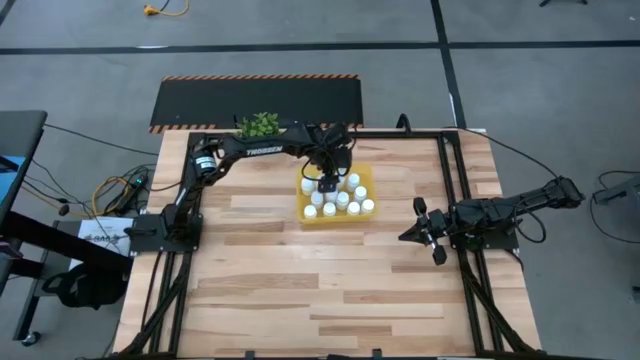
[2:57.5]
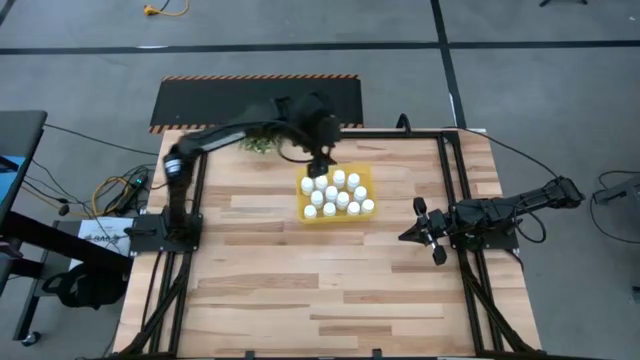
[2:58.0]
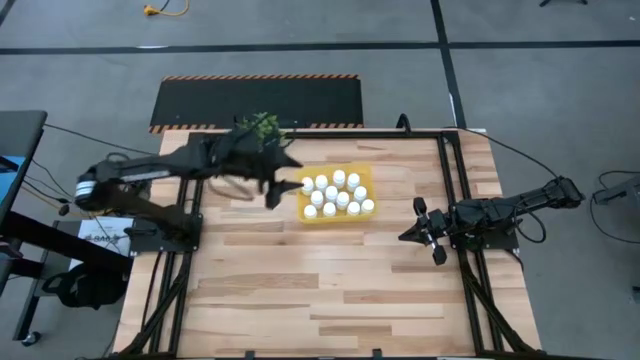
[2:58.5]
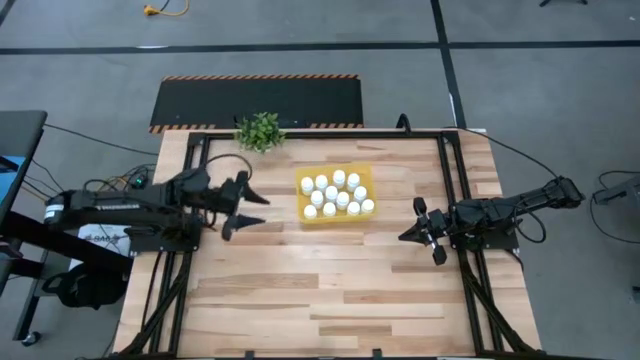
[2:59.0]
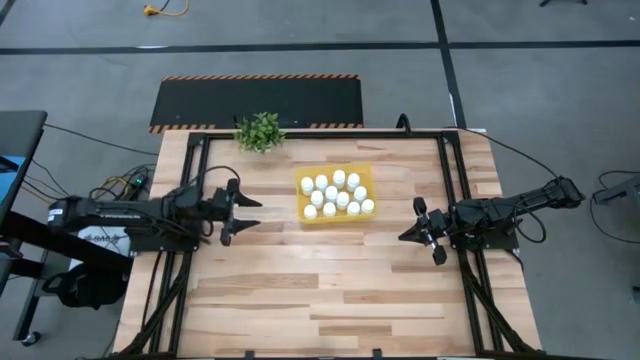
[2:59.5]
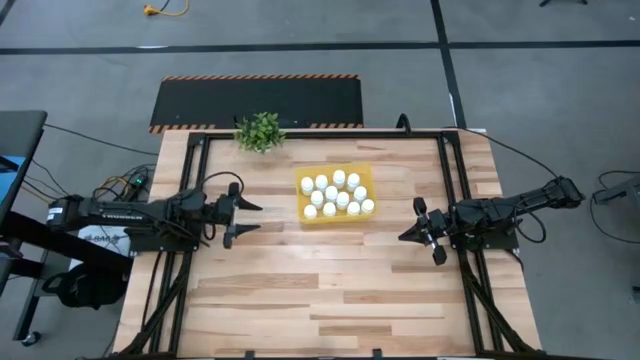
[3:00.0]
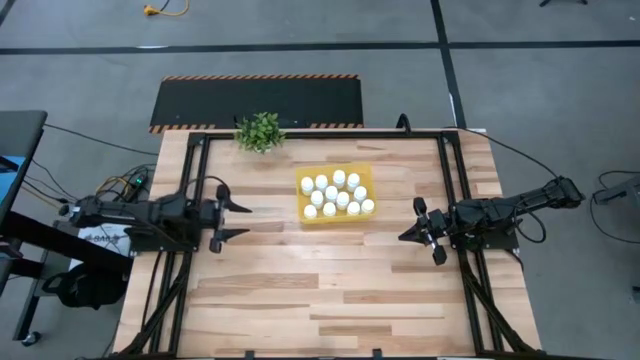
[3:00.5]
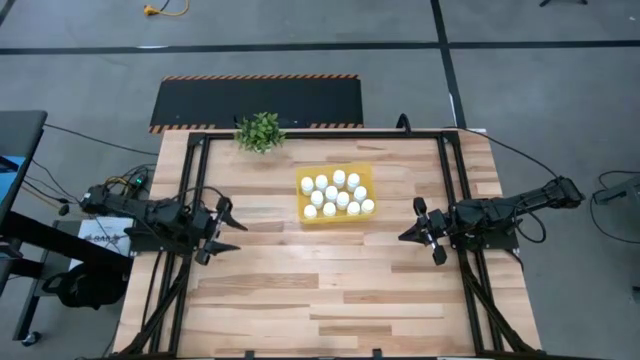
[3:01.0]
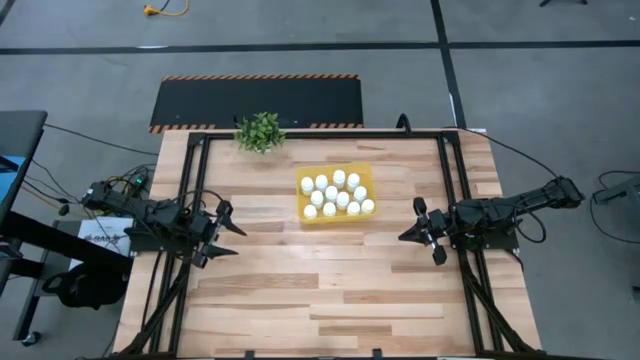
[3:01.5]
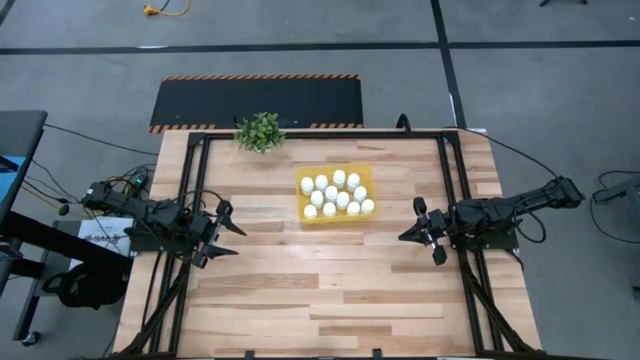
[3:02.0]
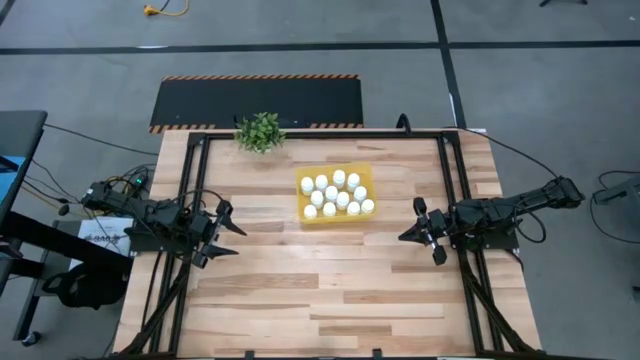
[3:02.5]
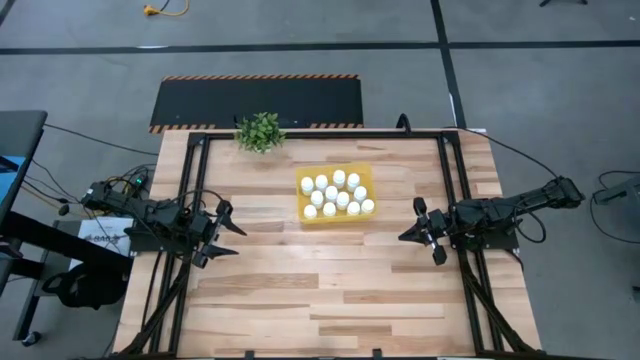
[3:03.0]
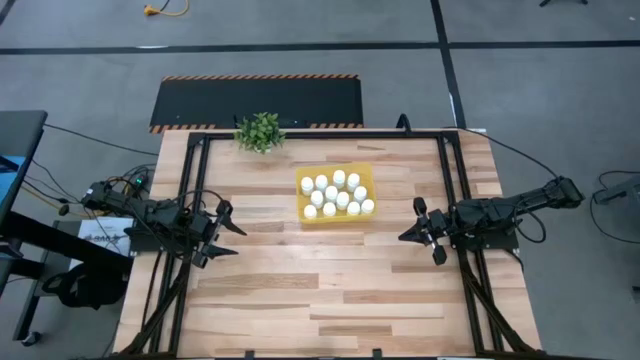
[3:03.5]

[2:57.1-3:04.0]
Task: Pick and place pill bottles into a basket
Return to Home Position

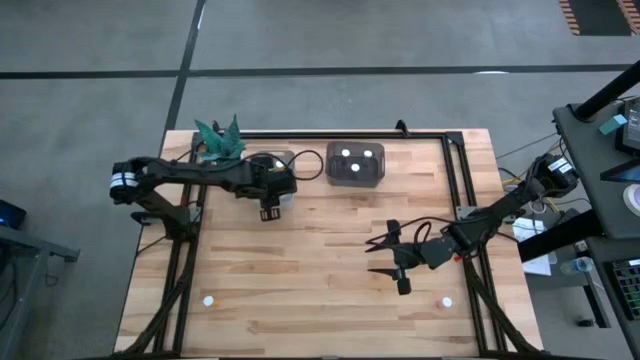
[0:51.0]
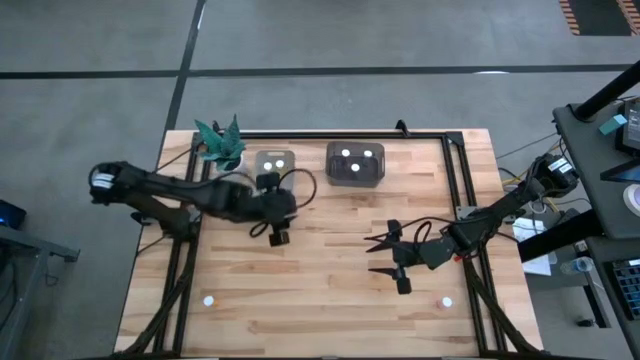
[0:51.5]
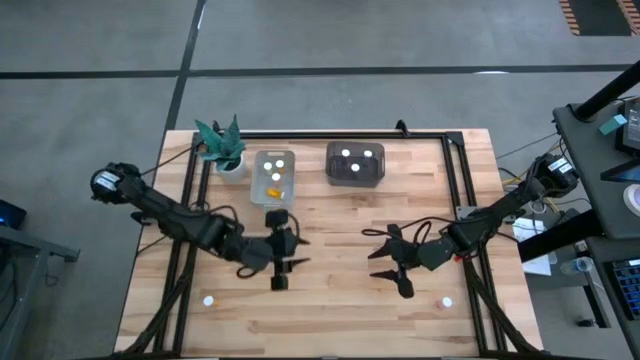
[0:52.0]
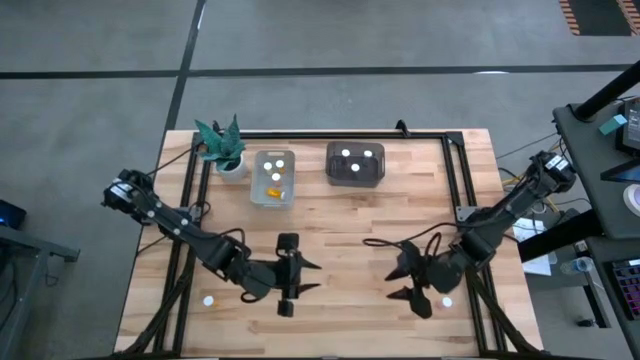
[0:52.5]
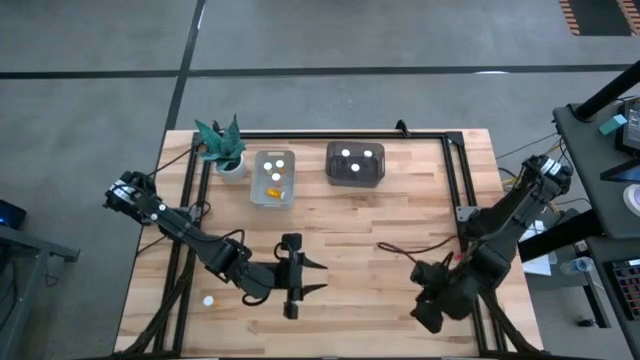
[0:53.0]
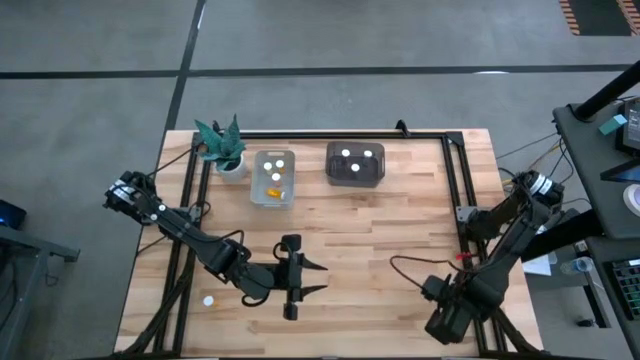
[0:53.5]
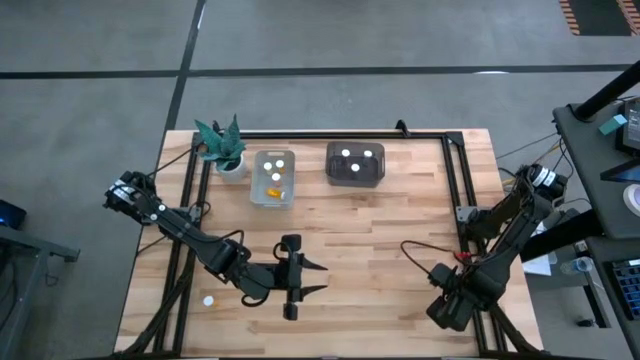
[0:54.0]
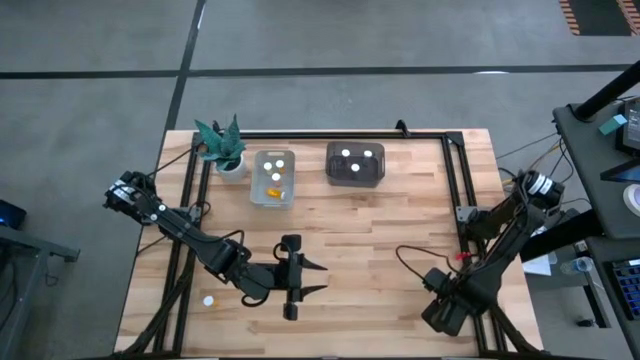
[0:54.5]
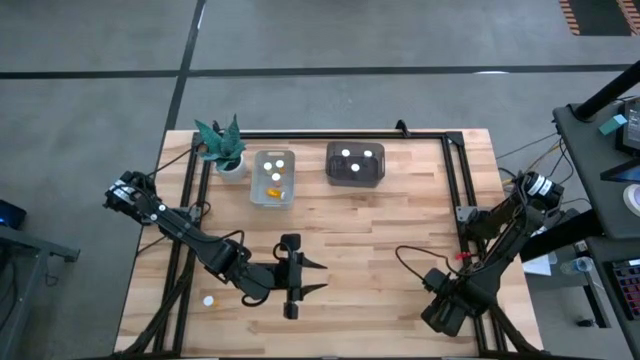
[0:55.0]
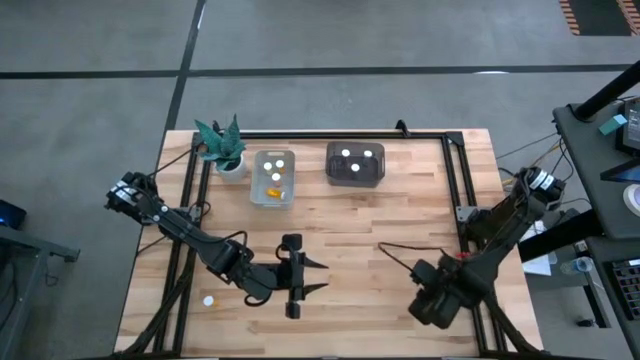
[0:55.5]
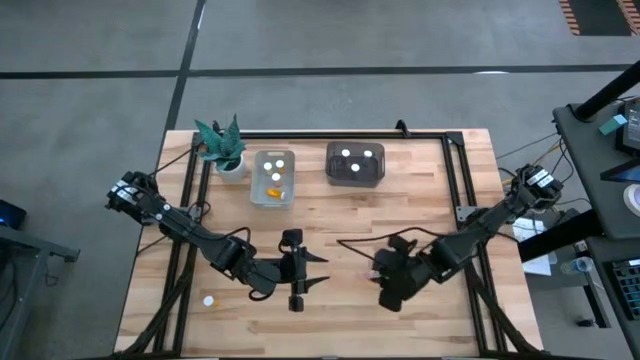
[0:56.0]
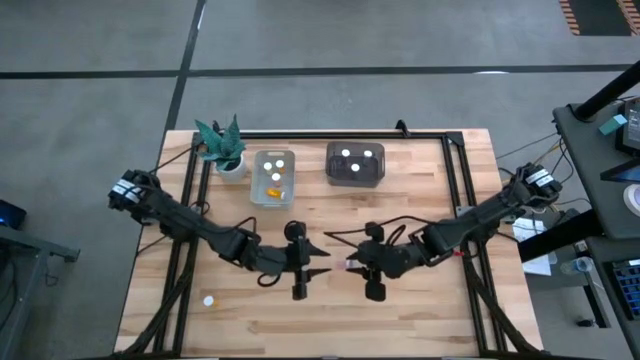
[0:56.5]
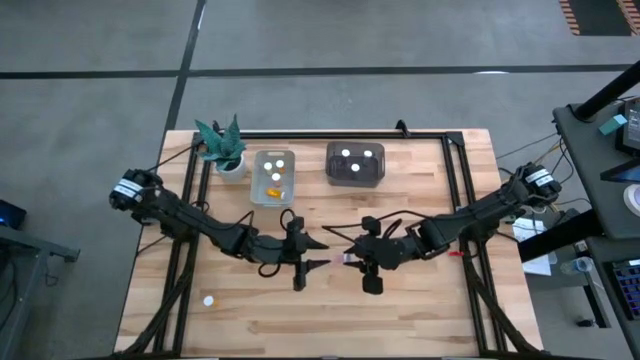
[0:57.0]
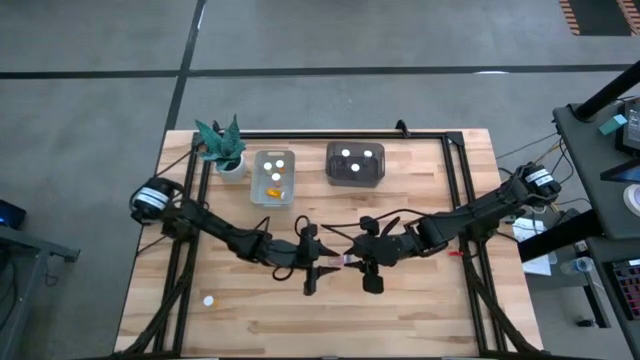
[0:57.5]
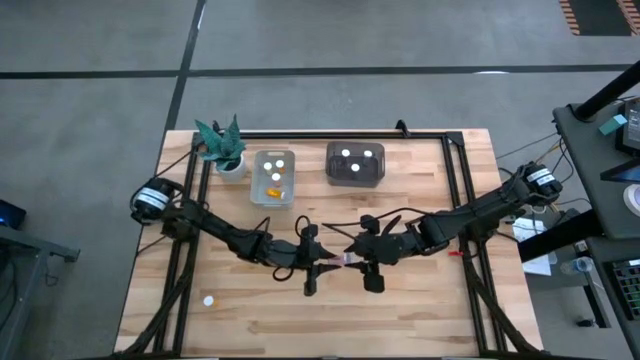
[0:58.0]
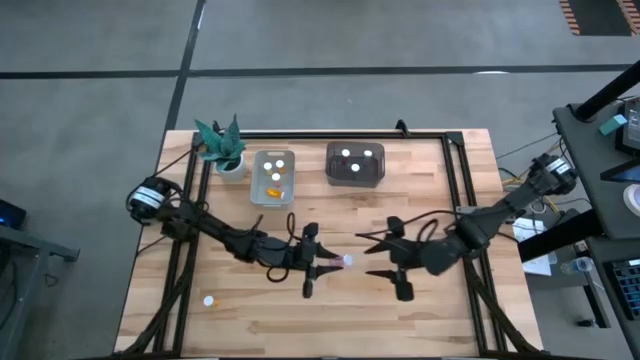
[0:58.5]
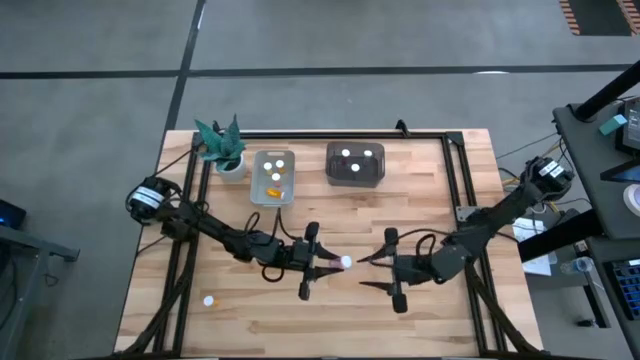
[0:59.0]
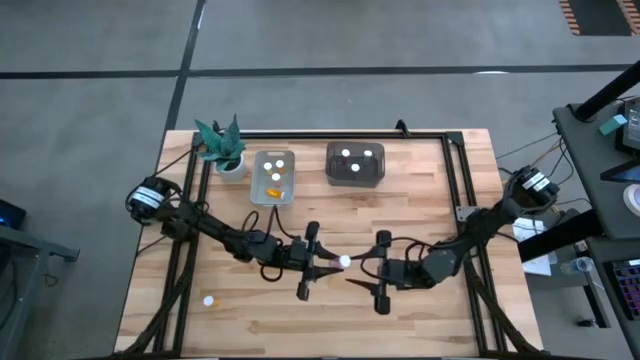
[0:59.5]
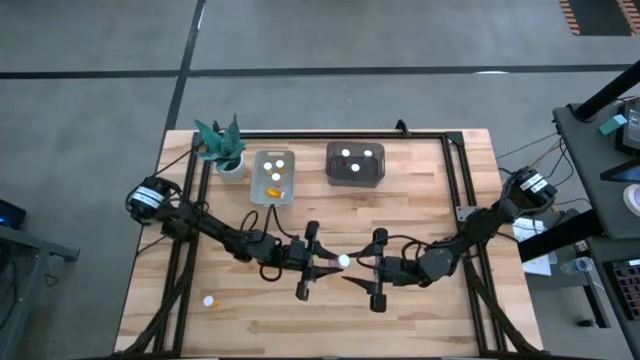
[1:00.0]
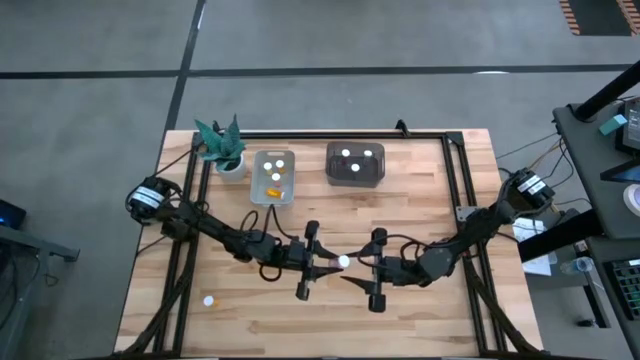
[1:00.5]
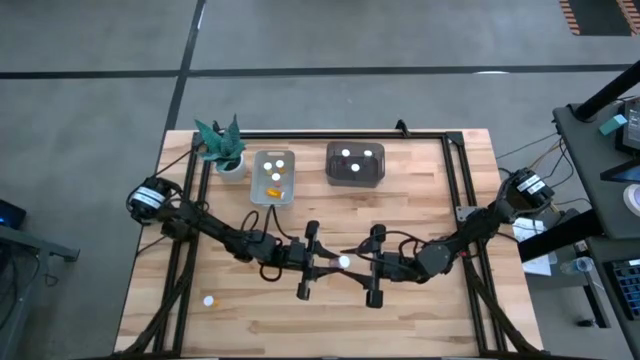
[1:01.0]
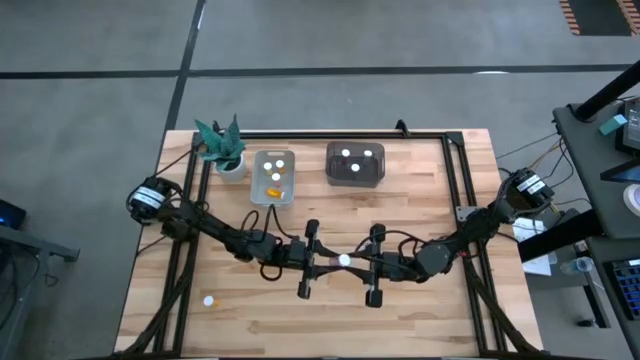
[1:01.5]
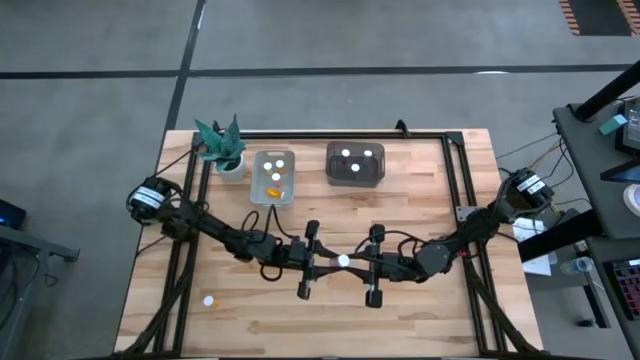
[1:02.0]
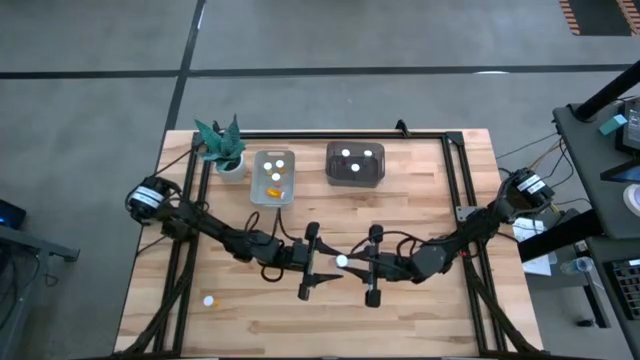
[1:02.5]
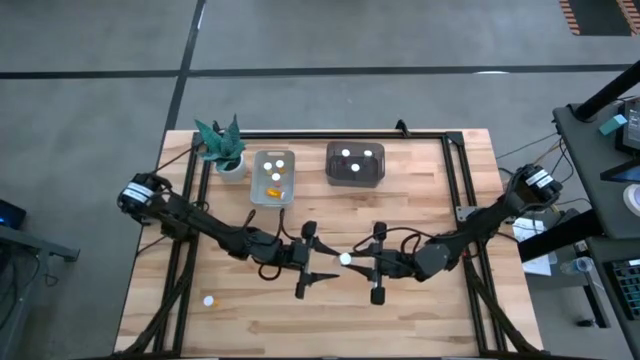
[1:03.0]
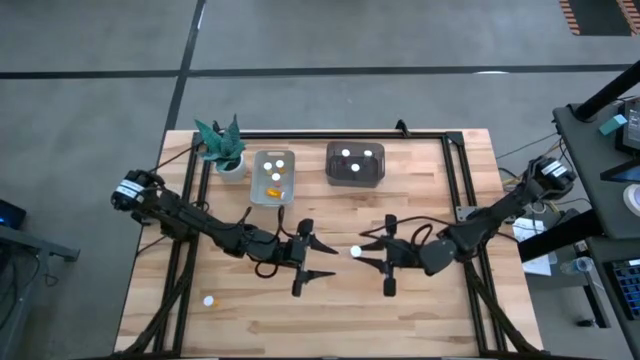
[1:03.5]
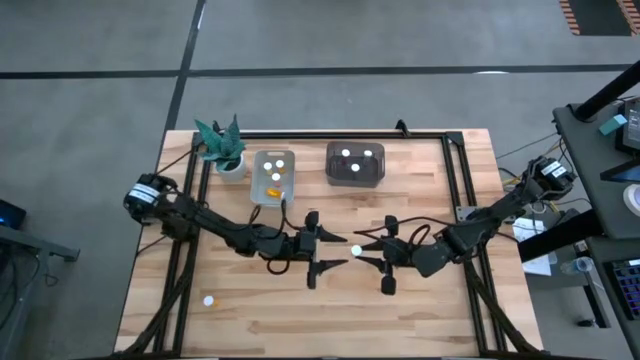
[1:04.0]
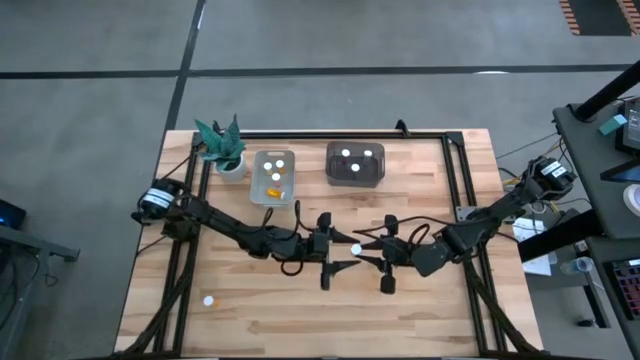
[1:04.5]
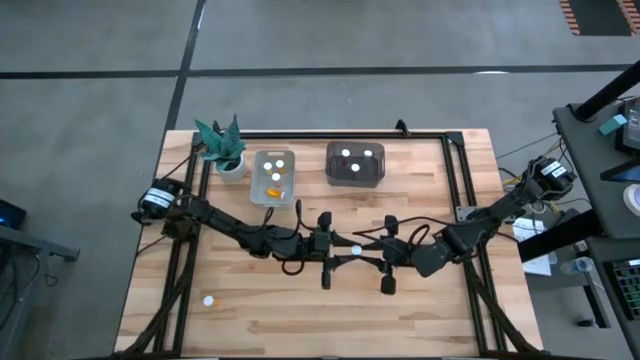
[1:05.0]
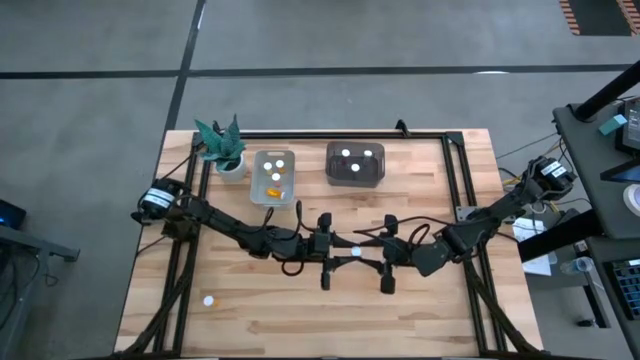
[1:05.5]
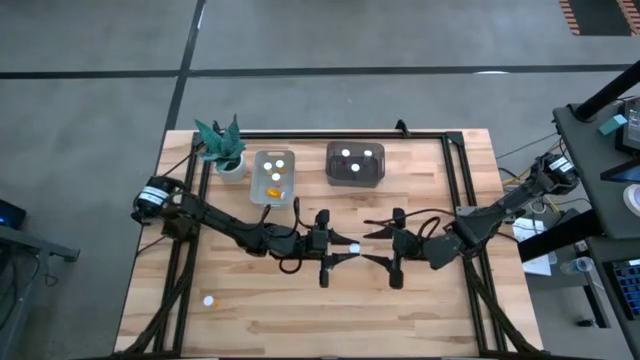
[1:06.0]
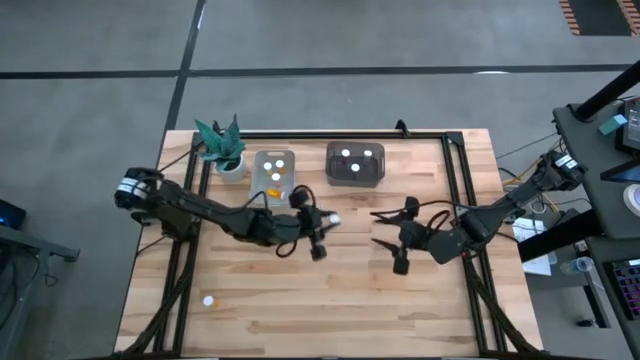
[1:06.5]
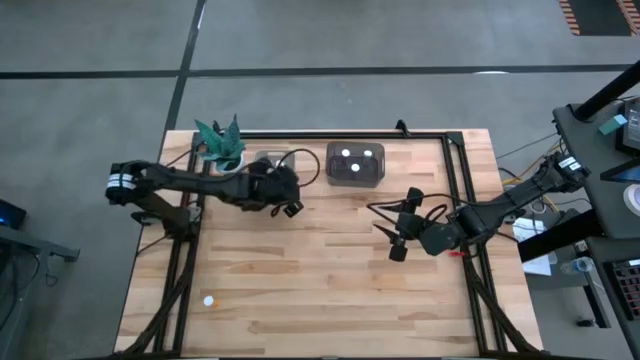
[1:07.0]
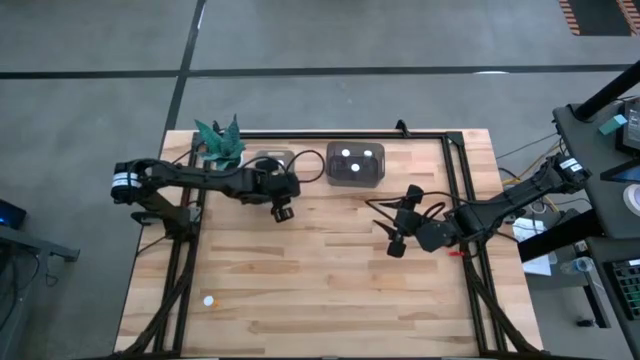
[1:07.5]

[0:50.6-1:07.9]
Task: Pick and place medicine bottles into bin by pill shape (circle, oval)
Put the pink tablet bottle into the gray bin
